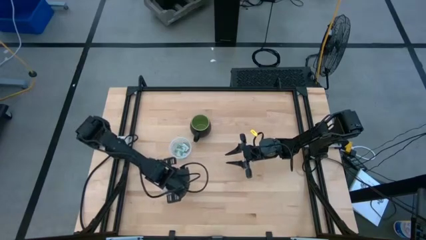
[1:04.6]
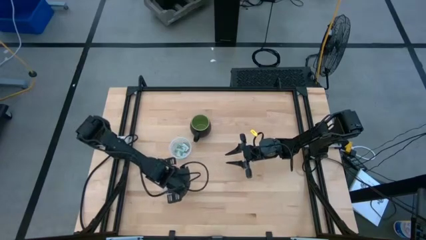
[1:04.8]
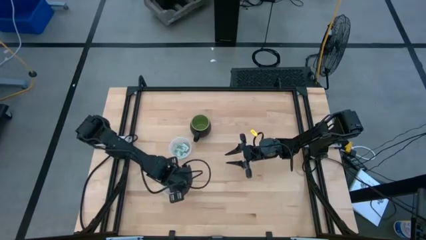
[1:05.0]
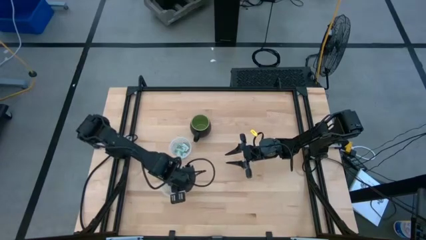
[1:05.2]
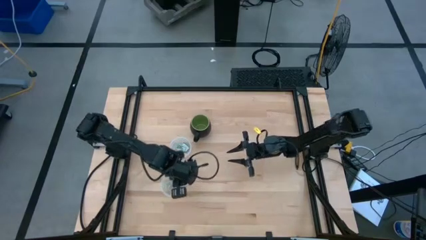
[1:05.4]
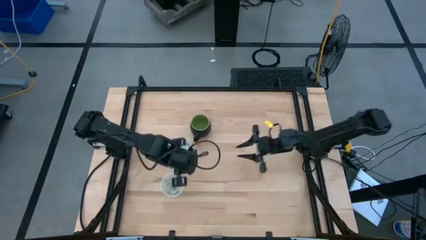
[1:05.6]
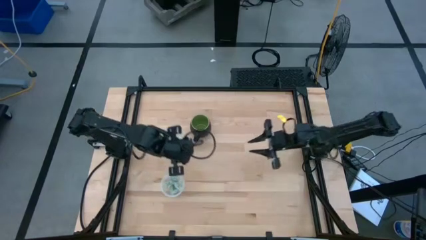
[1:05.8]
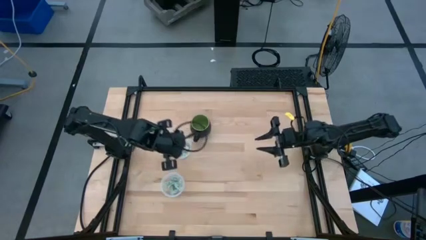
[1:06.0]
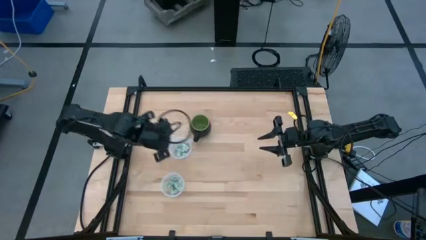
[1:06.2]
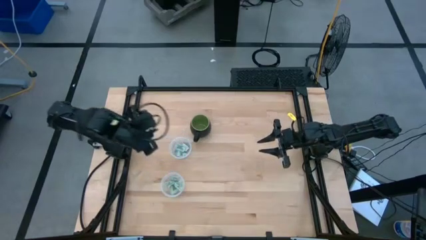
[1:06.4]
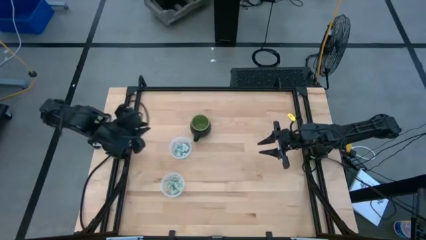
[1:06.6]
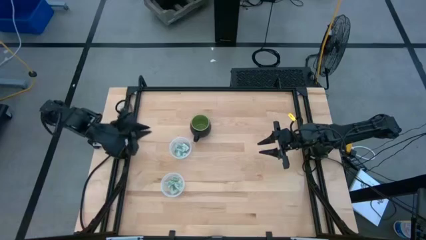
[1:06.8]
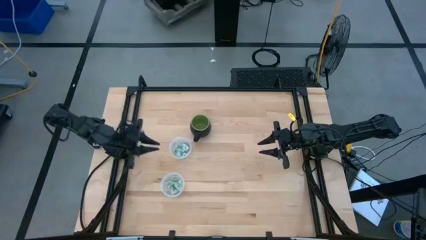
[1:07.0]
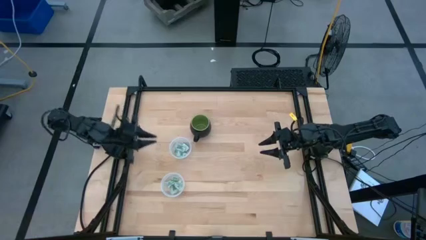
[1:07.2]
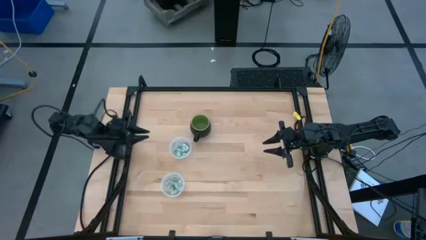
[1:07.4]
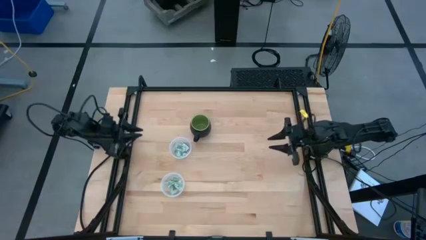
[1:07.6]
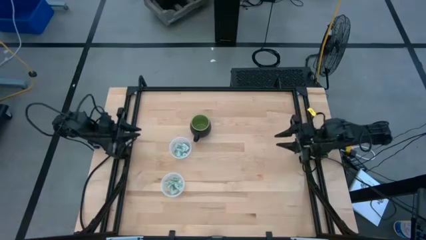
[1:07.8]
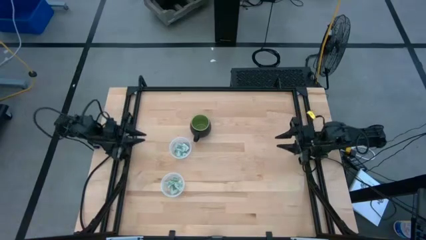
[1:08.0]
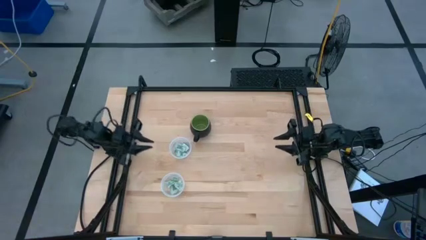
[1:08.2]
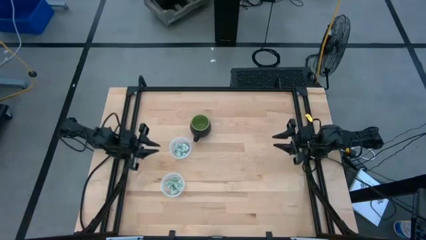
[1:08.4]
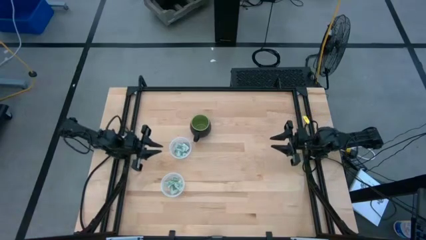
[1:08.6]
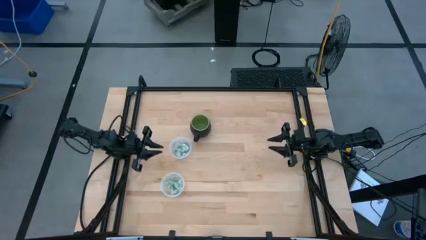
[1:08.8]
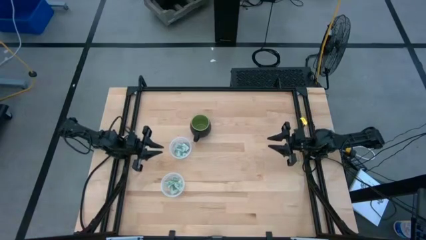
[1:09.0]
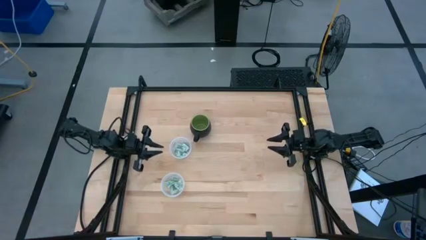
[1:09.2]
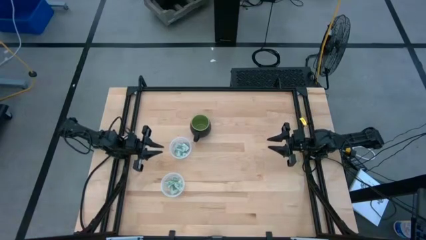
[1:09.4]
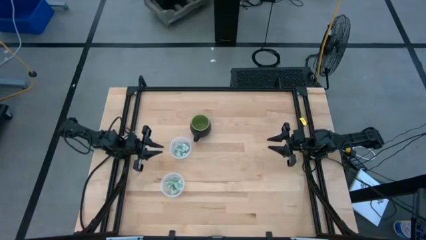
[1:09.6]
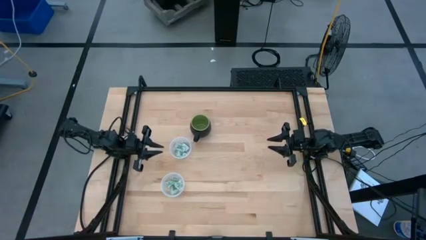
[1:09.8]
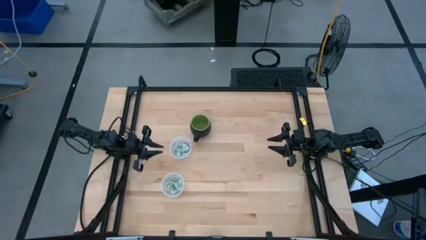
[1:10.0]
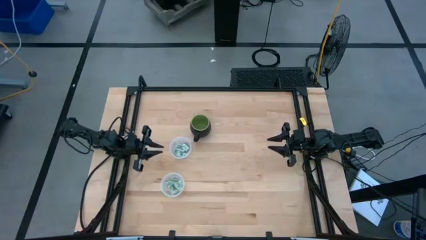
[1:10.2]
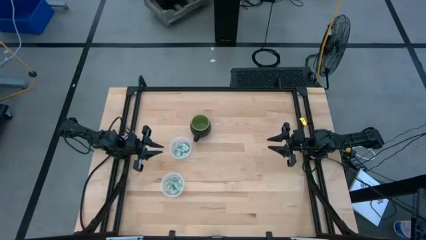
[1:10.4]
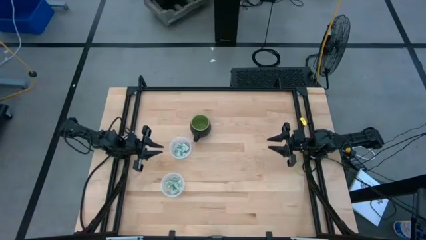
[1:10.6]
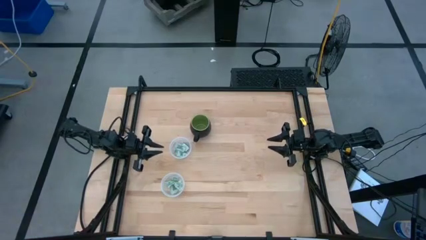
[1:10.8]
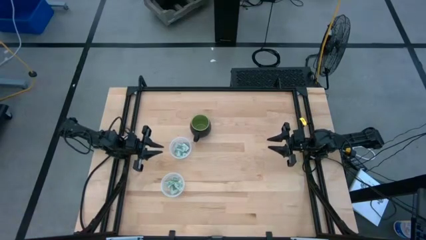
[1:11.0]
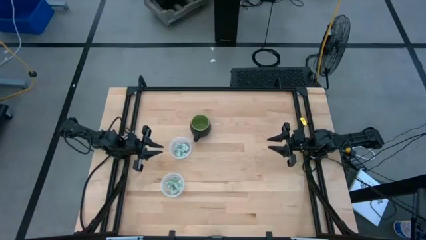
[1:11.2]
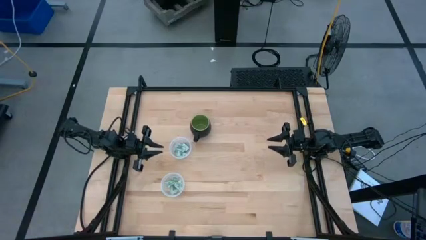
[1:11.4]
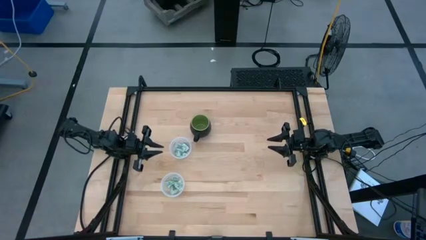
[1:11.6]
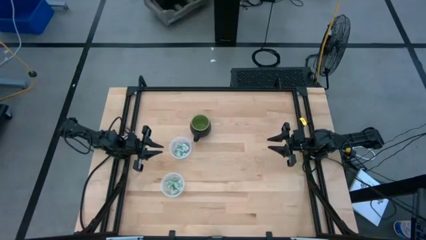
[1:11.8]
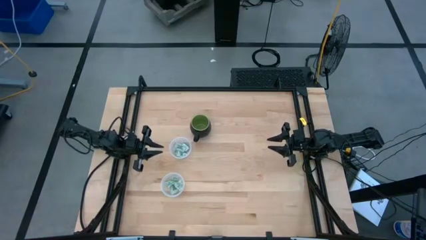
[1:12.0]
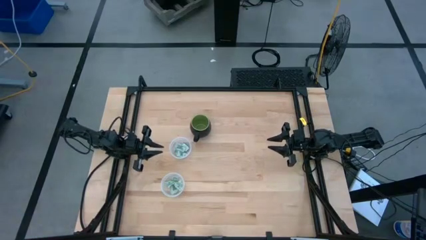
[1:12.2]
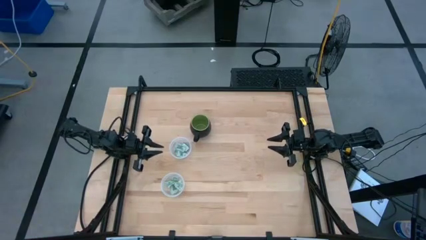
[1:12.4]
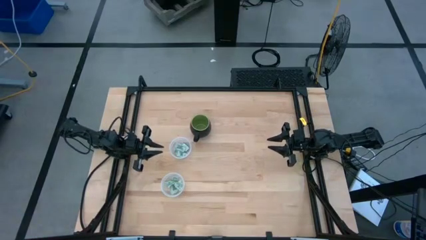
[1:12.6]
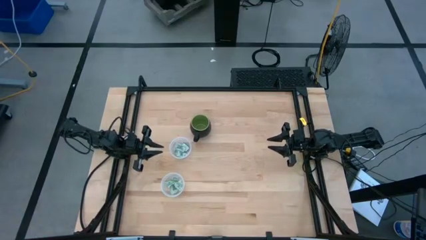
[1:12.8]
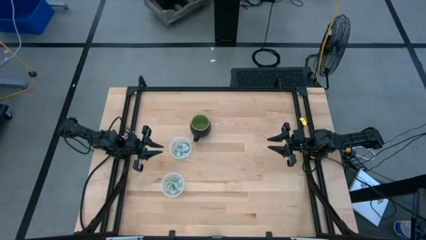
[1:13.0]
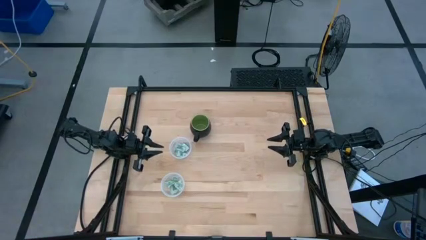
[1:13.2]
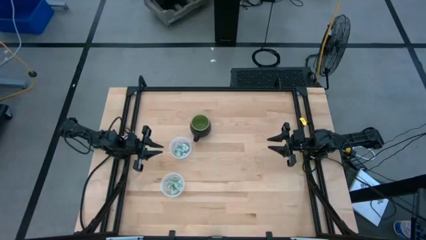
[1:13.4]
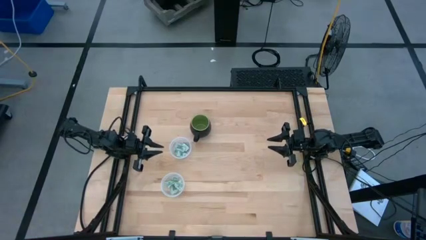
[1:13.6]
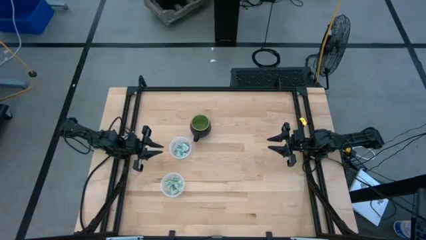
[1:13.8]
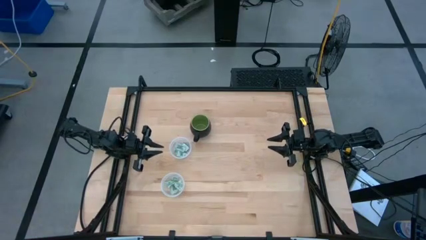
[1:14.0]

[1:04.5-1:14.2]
Task: Pick and place Stevia / Truvia into bins
Return to Home Position

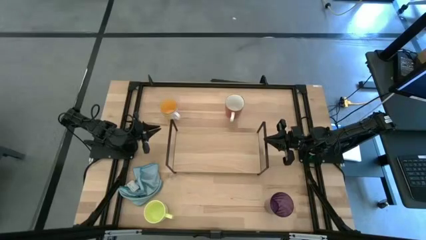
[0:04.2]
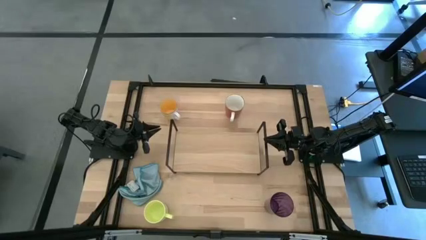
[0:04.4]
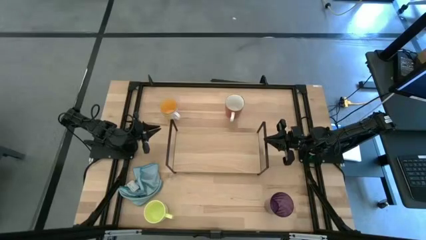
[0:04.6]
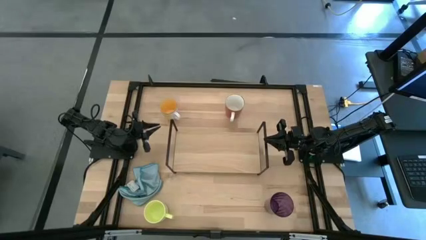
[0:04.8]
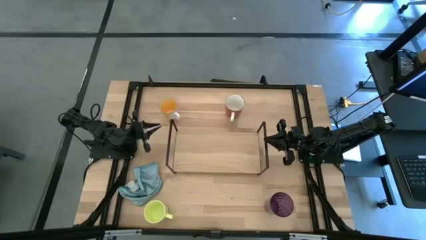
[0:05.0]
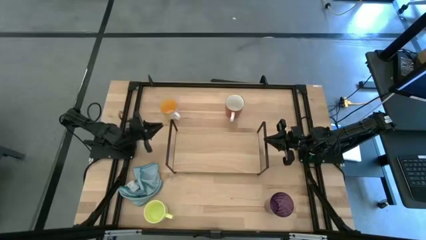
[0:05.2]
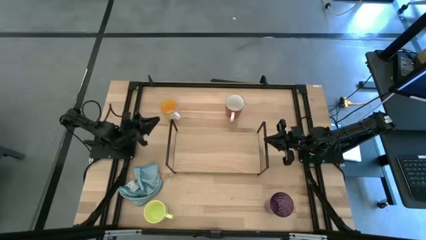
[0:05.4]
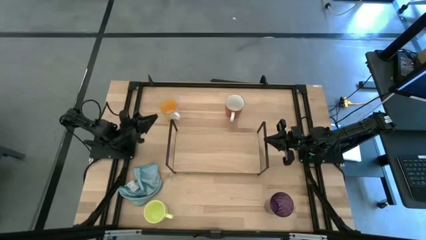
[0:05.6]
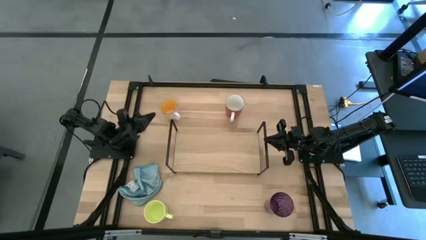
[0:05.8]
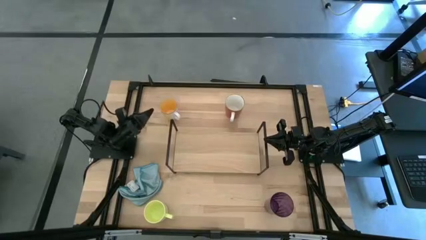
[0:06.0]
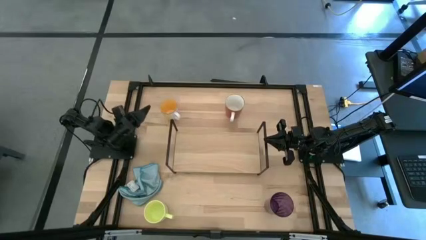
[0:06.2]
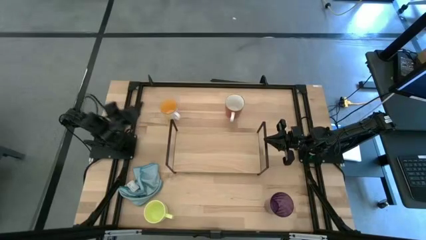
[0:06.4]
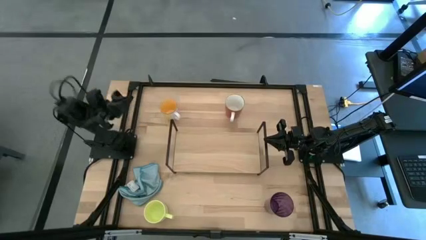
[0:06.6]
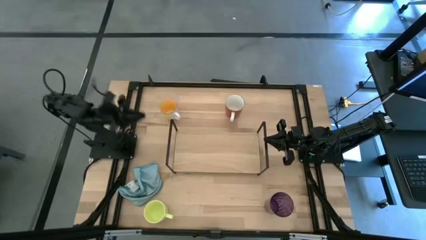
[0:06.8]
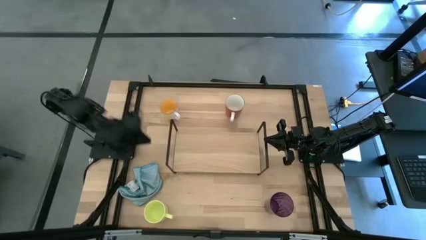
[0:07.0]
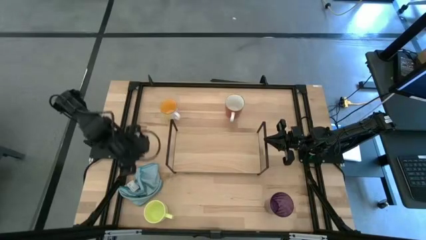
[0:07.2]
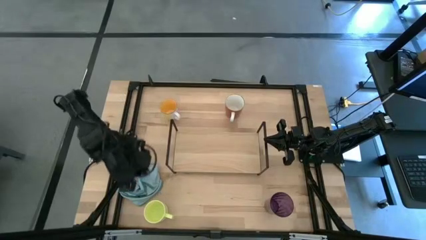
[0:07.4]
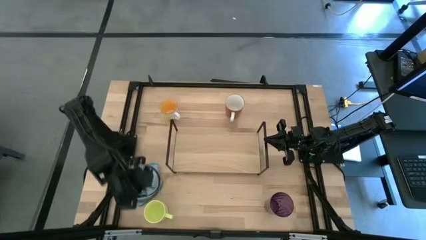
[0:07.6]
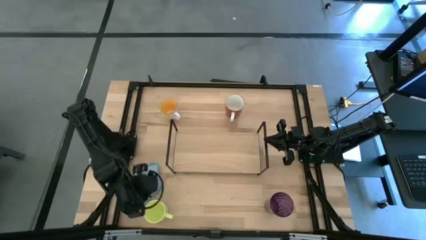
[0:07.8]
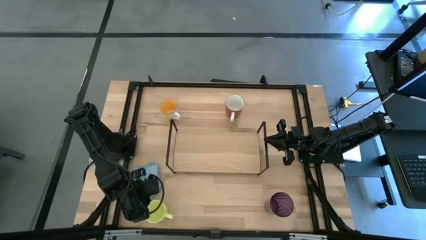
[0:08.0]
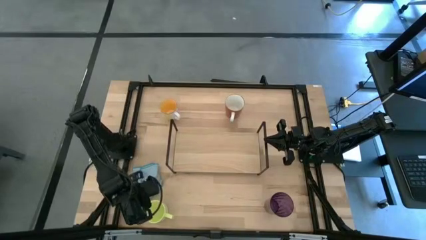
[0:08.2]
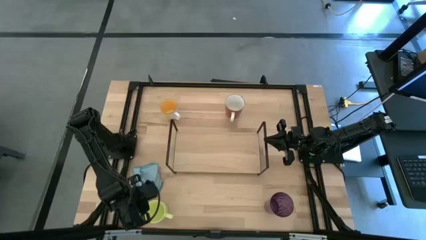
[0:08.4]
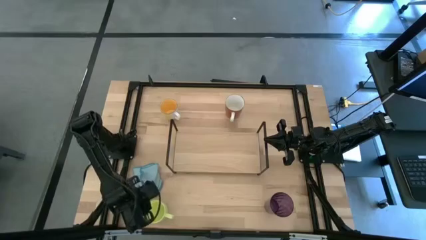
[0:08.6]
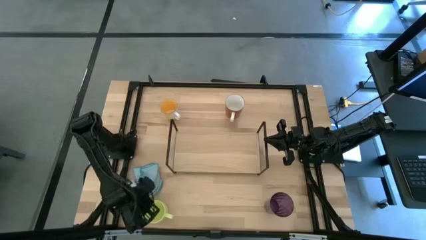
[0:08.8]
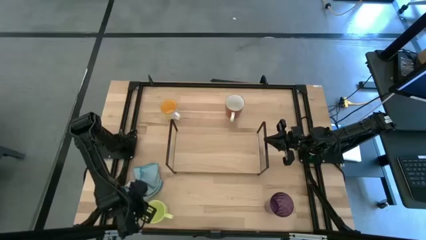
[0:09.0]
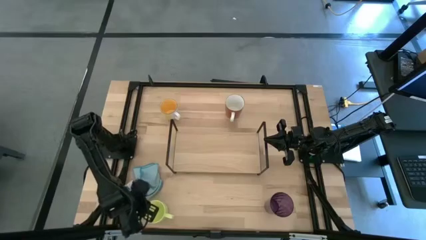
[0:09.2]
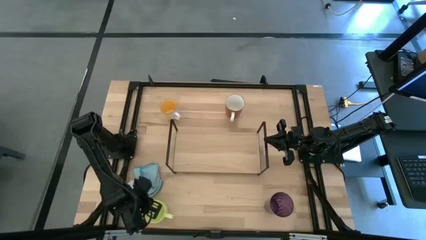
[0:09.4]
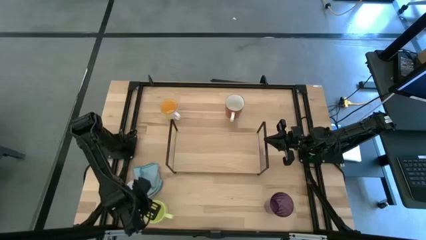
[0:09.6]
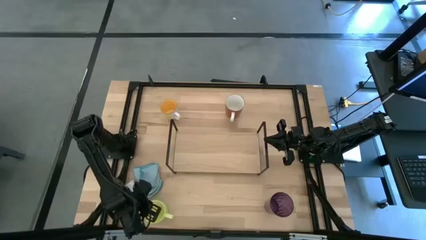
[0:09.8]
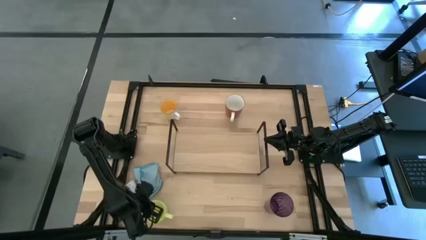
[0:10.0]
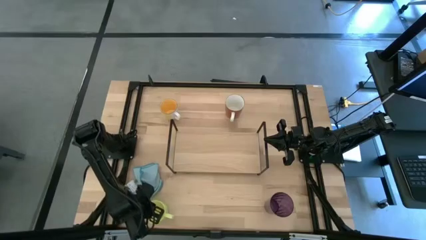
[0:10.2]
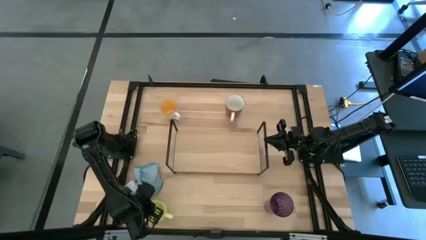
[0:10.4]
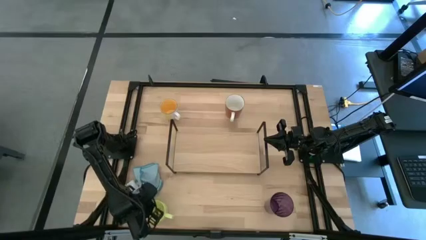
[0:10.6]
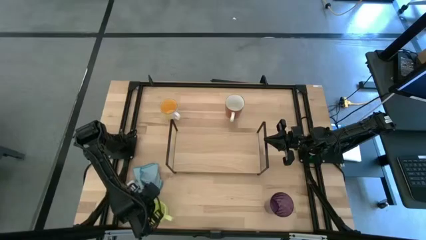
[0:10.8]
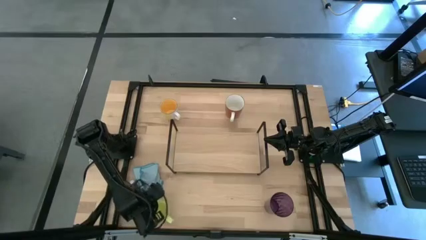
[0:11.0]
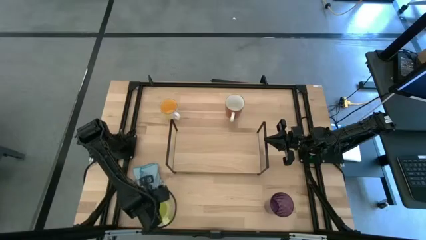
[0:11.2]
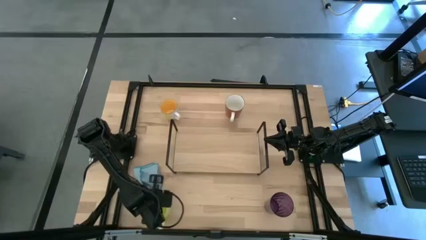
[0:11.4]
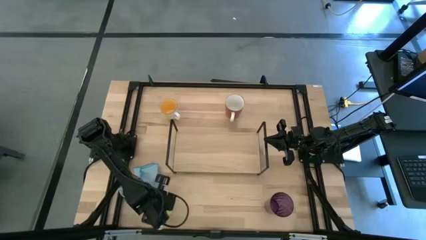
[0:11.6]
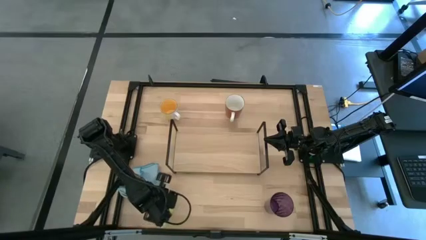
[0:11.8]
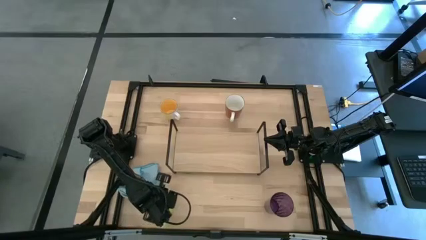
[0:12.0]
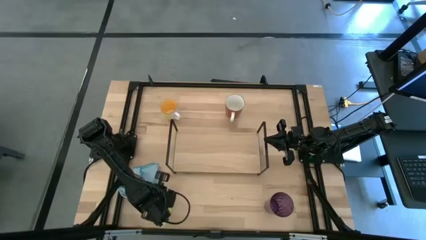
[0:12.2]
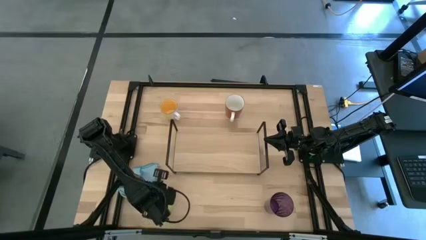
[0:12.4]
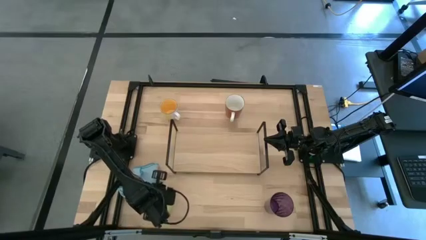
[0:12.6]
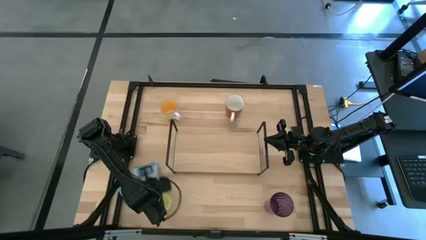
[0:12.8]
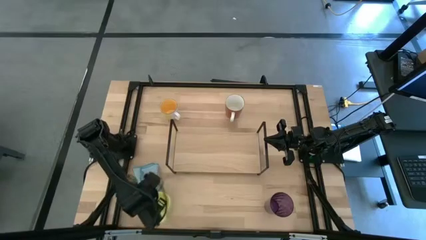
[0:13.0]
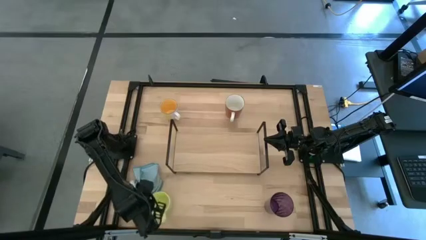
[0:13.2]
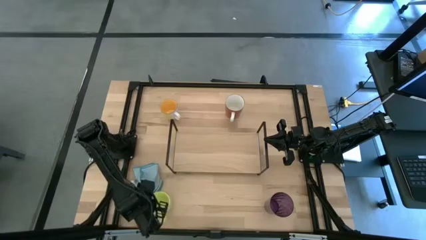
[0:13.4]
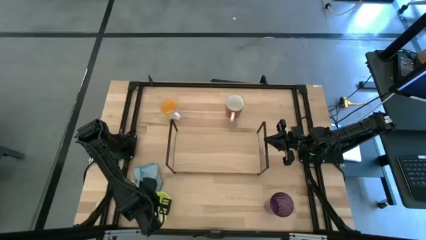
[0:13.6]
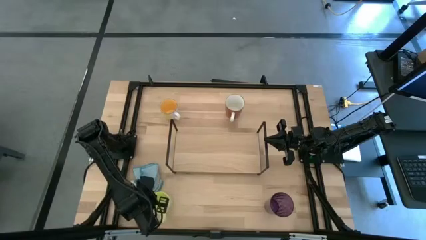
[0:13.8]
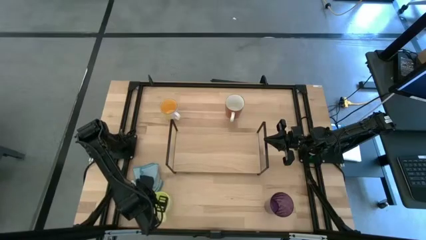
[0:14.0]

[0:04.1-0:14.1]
Task: Stack small to large cups/mugs on shelf
Put the green cup on the shelf
